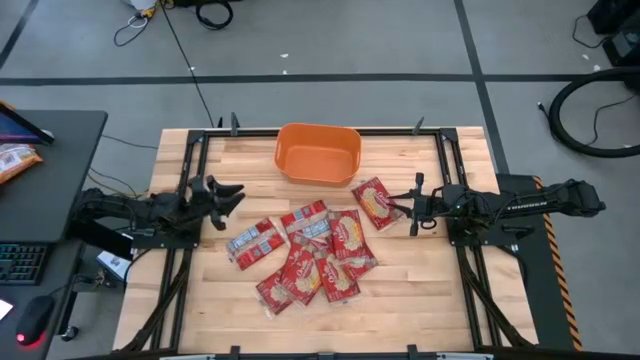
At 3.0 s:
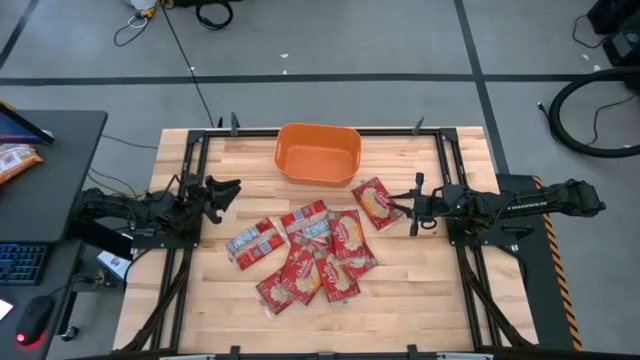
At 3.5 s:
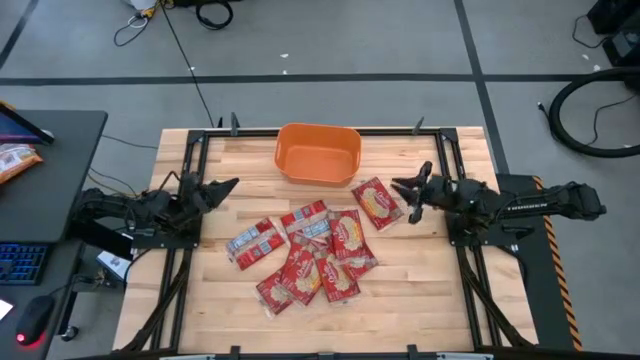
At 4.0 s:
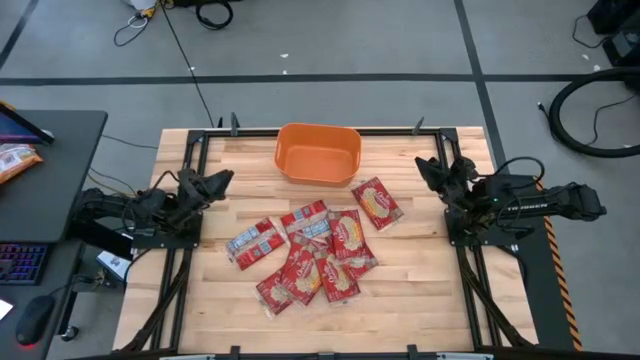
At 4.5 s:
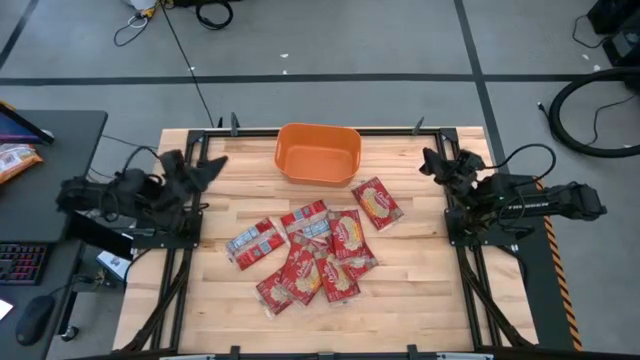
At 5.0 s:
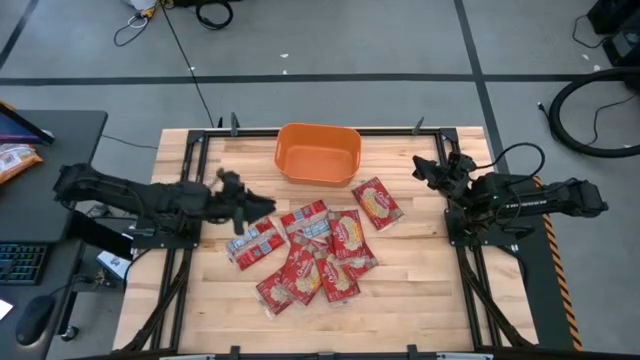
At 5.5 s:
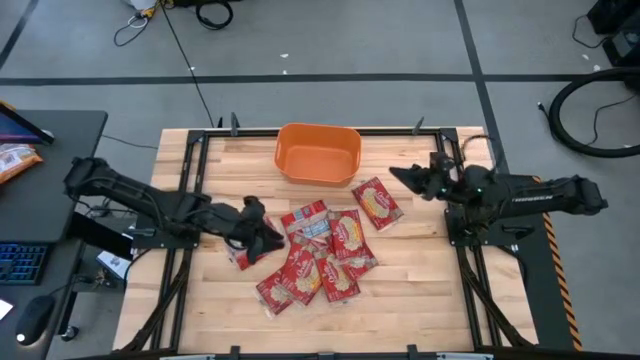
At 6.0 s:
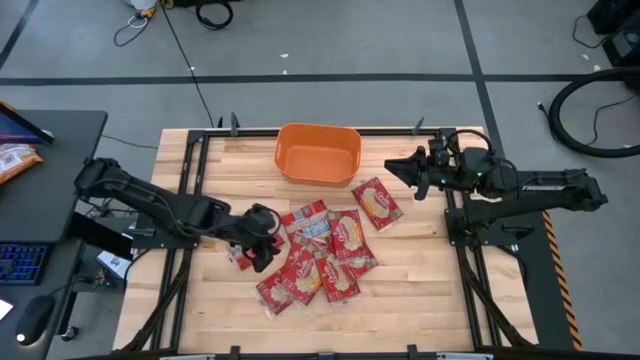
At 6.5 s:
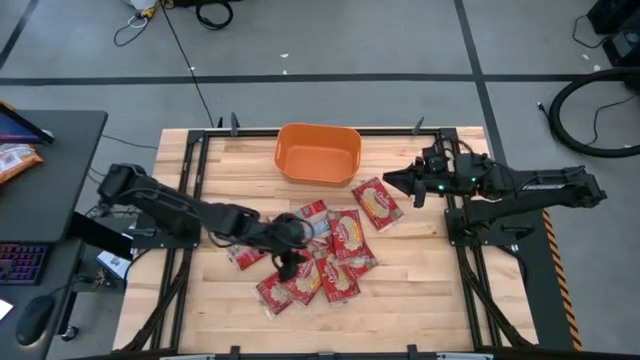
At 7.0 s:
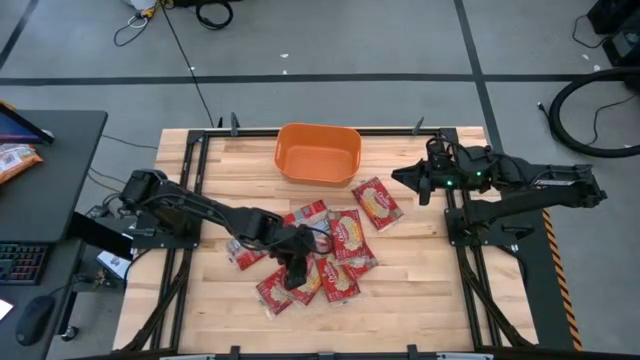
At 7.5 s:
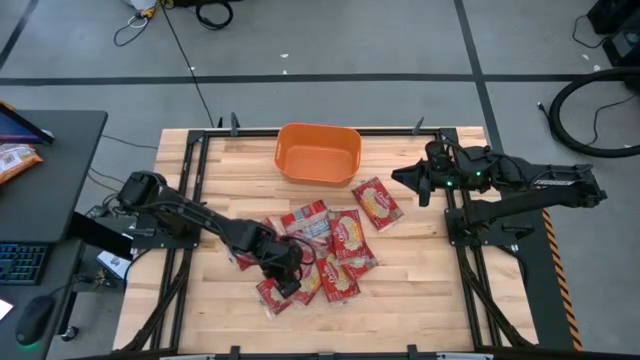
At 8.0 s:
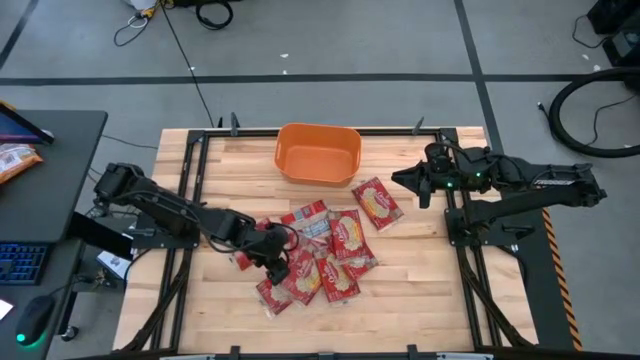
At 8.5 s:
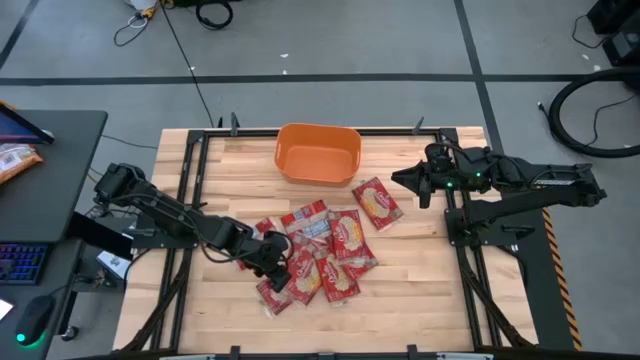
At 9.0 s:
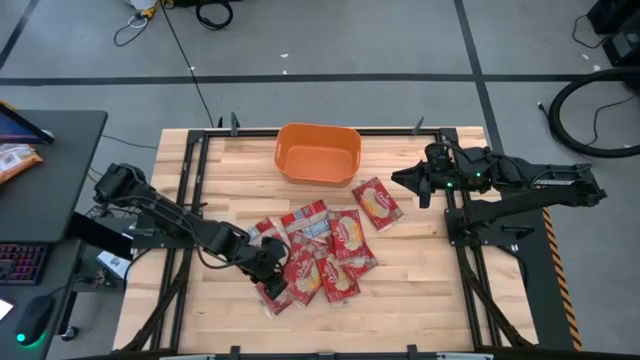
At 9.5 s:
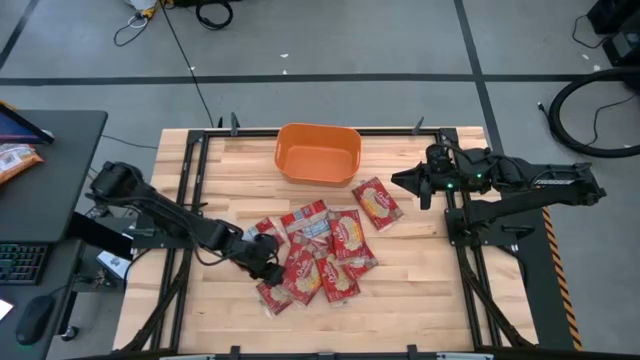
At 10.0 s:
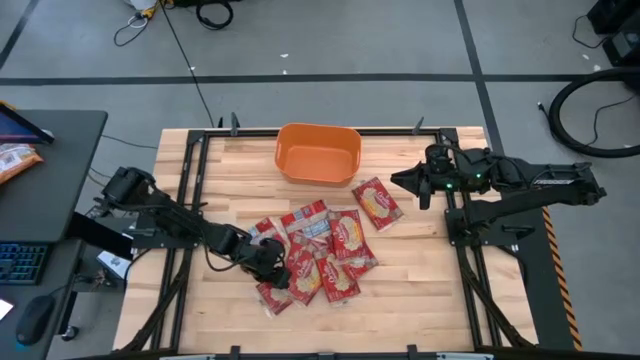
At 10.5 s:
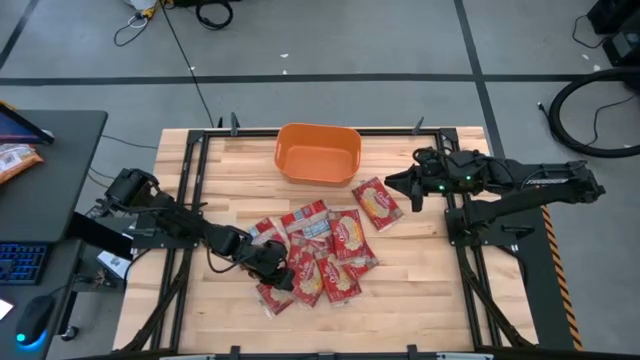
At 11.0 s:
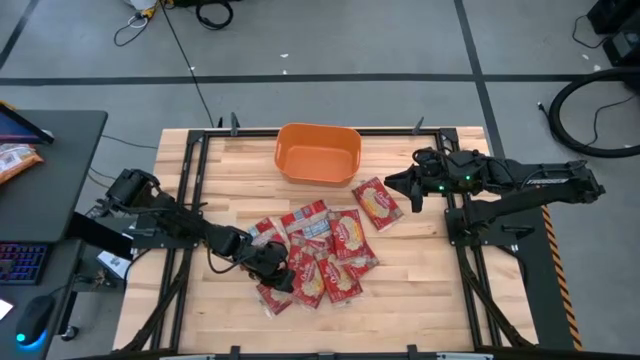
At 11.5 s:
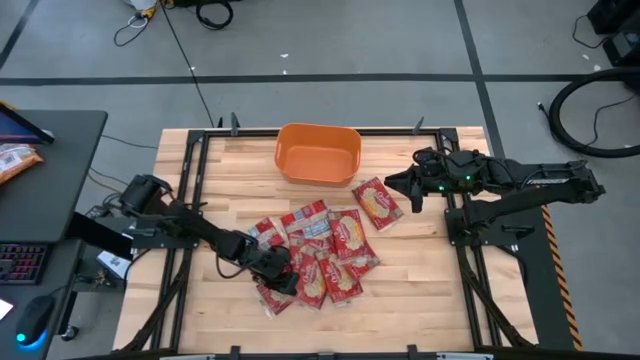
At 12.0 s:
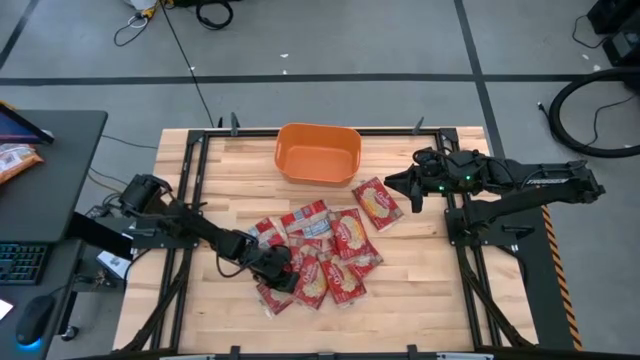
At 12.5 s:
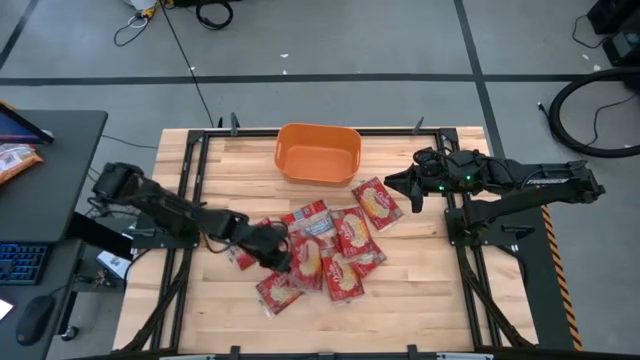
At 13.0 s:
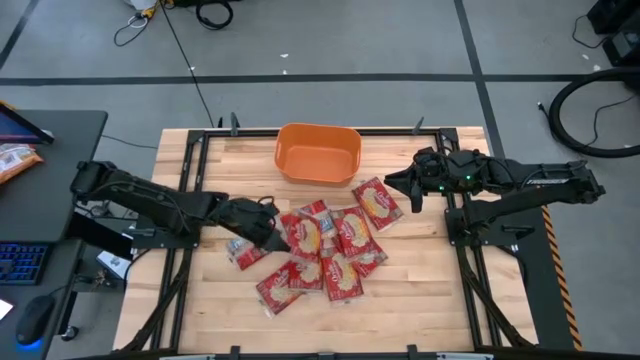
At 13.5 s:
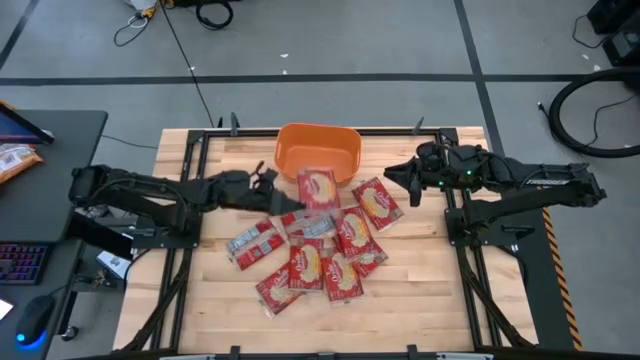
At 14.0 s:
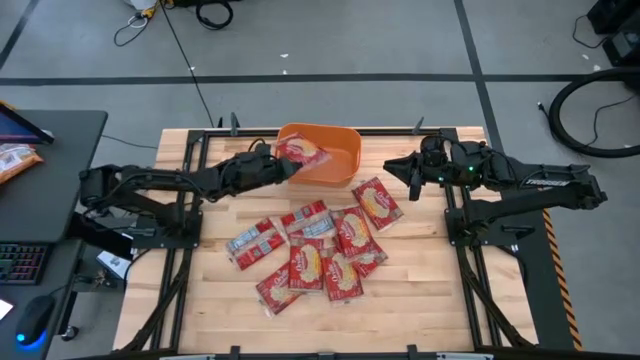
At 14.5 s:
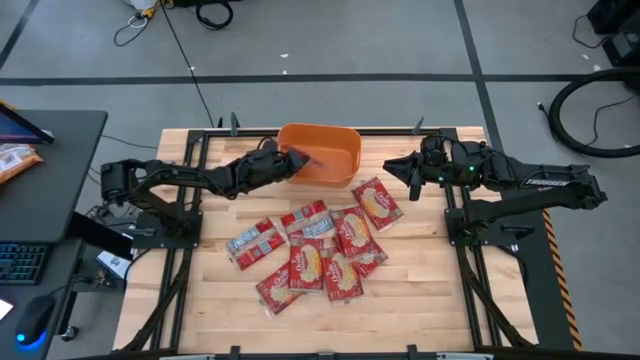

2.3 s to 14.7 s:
Task: Sort popcorn bags into baskets
Put the popcorn bag into the orange bin

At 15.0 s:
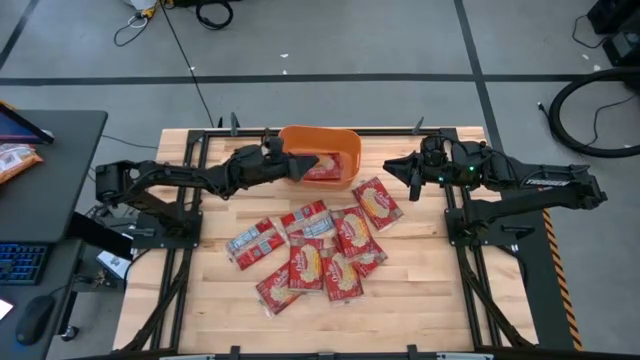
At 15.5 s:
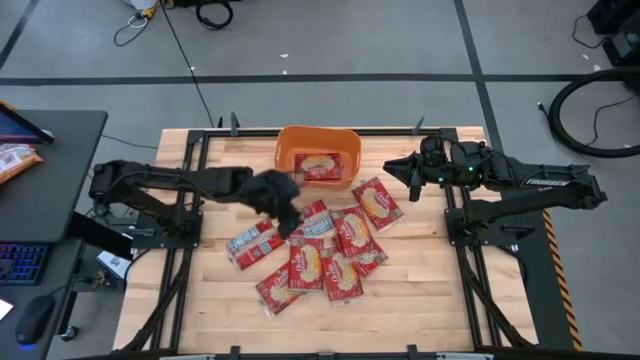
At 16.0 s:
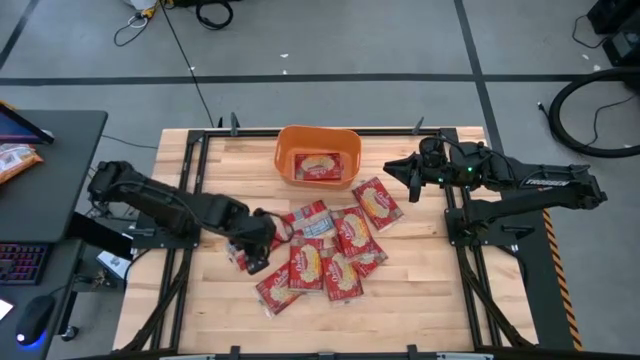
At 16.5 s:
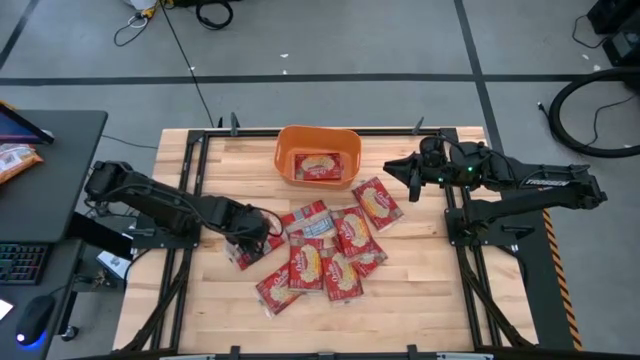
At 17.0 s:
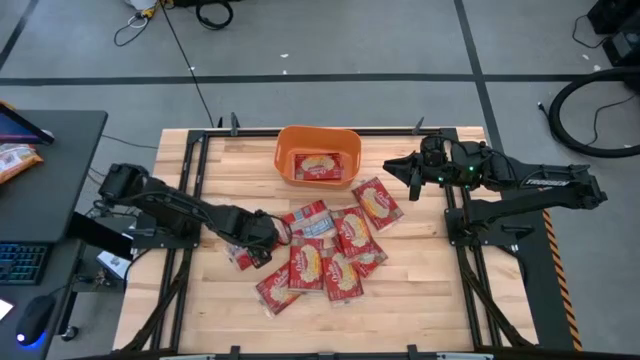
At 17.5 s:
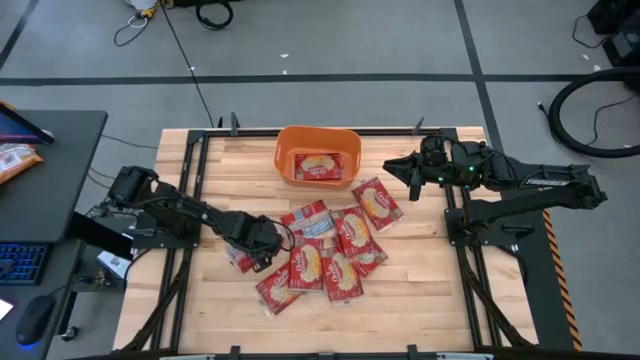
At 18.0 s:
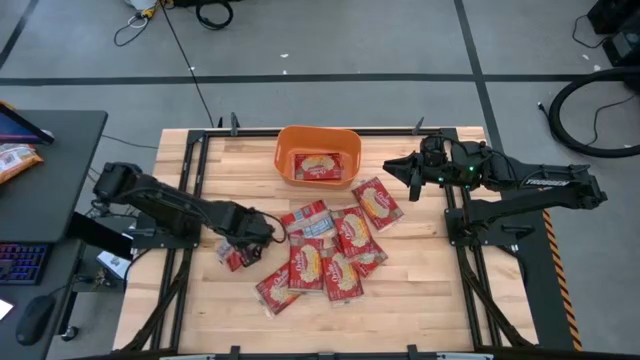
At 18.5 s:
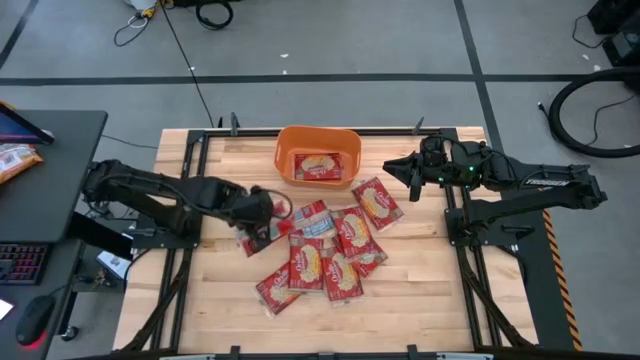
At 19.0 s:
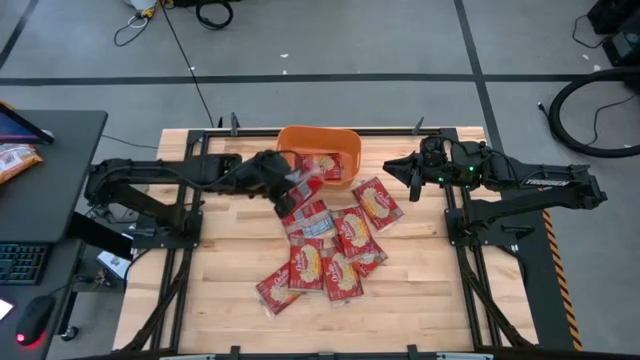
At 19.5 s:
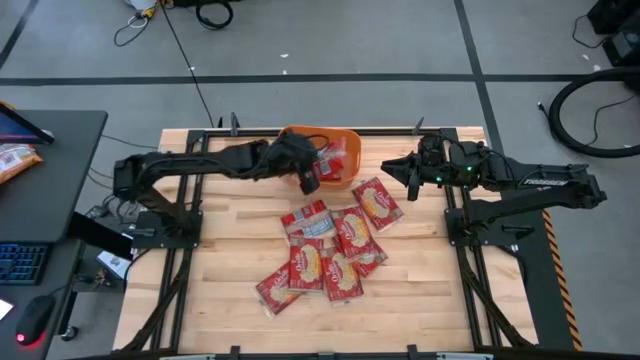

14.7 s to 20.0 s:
Put the popcorn bag into the orange bin

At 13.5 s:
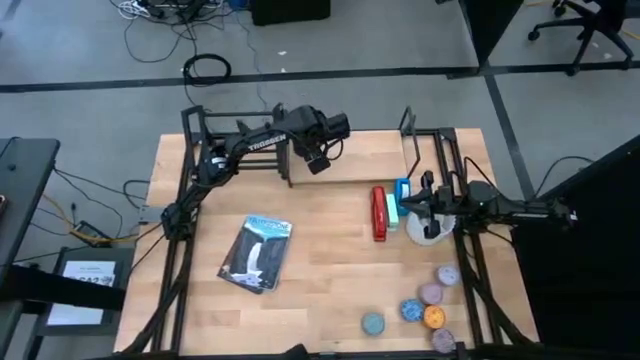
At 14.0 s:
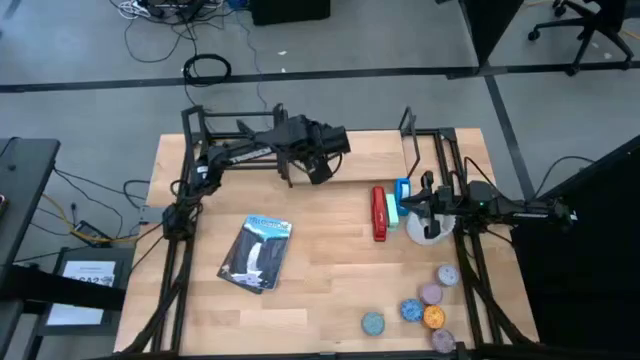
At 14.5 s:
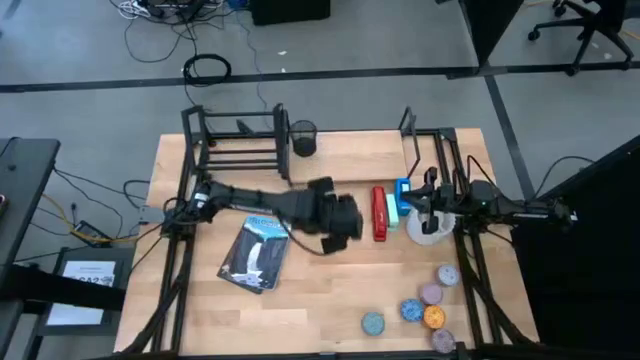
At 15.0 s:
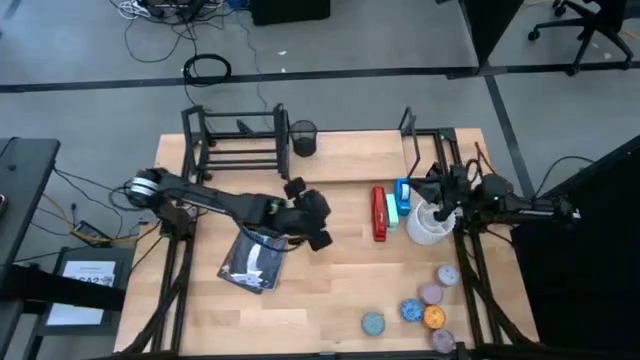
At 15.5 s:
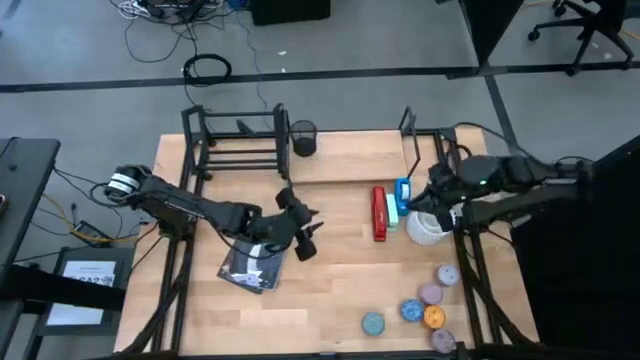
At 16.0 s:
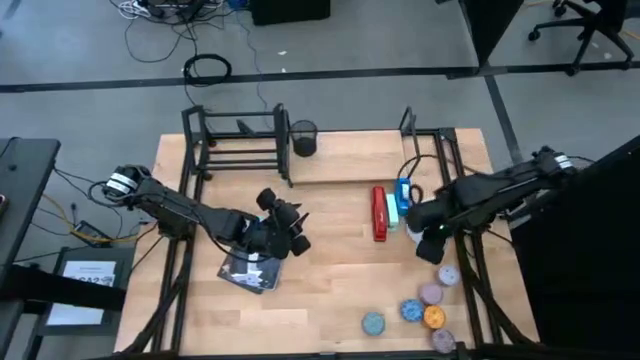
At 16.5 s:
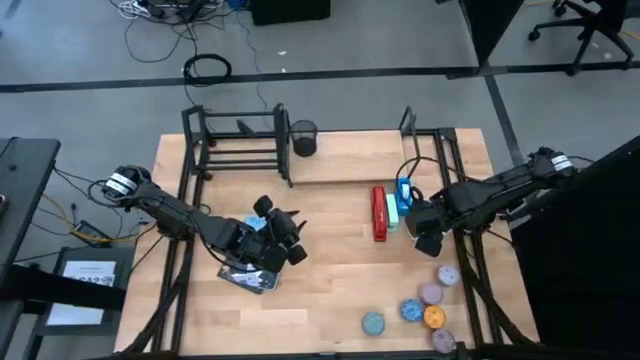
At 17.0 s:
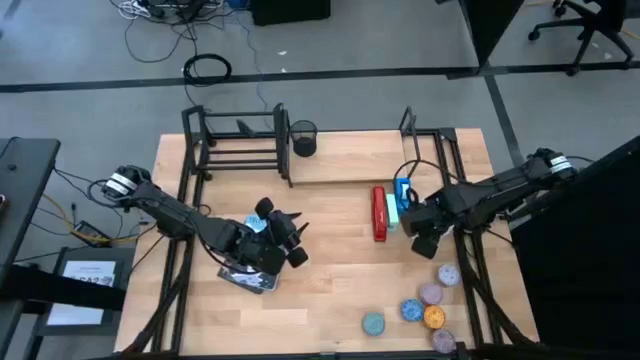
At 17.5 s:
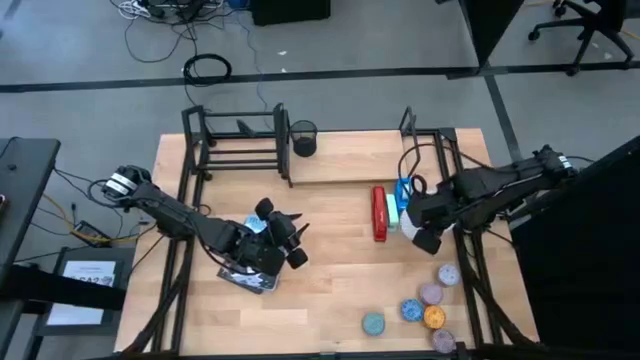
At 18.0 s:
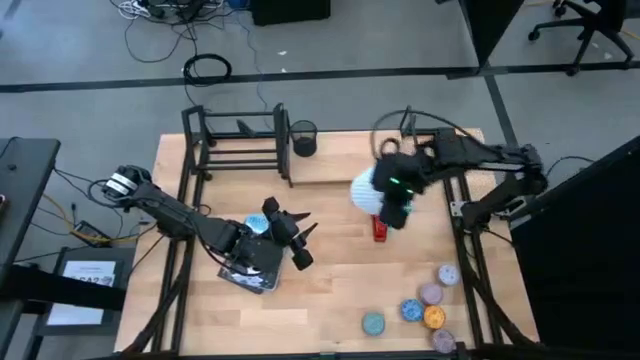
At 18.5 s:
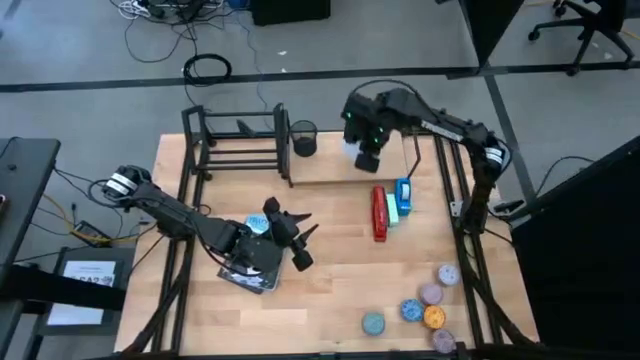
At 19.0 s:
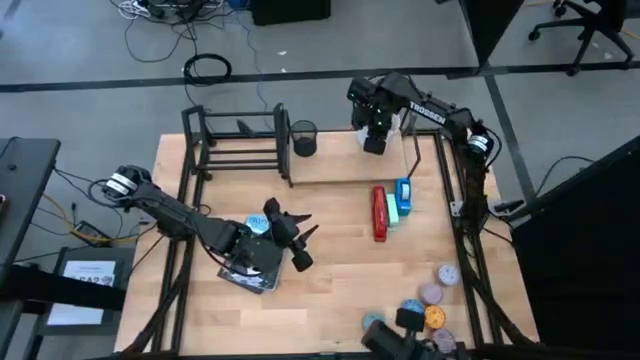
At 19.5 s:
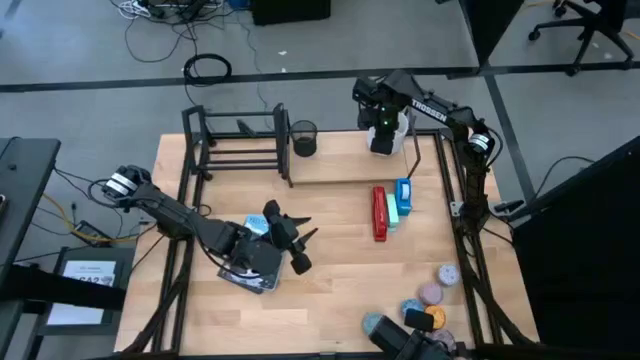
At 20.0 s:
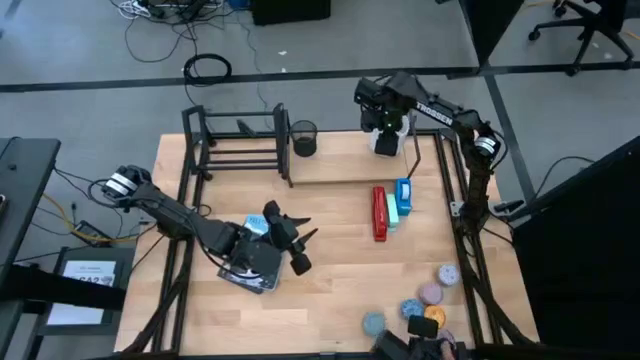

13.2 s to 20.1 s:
Task: Stock shelves
Put the white pen organizer on the shelf
